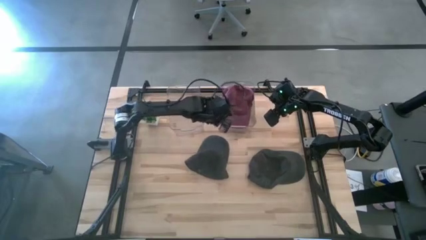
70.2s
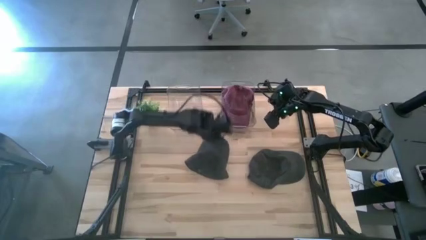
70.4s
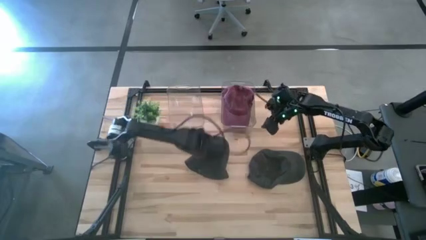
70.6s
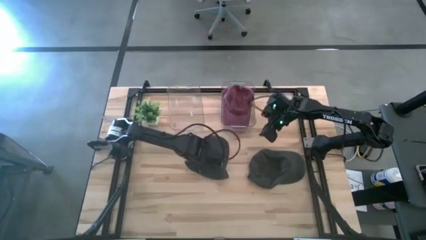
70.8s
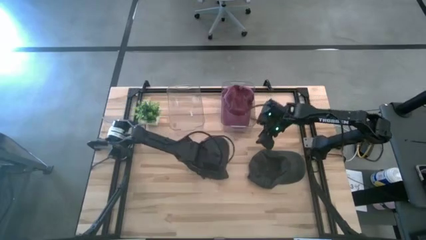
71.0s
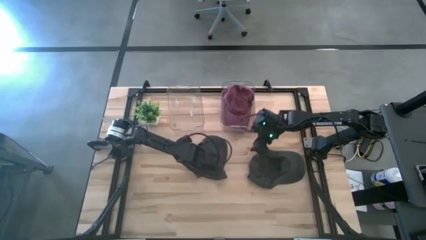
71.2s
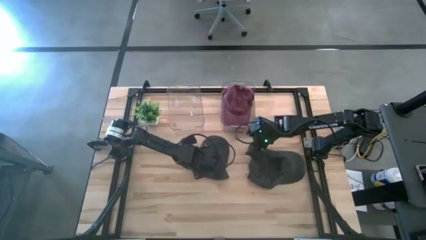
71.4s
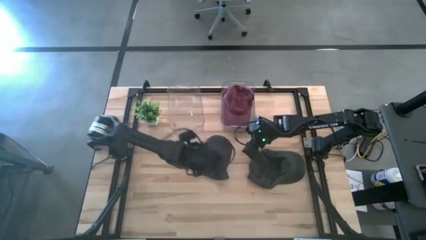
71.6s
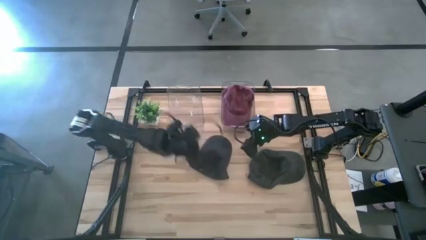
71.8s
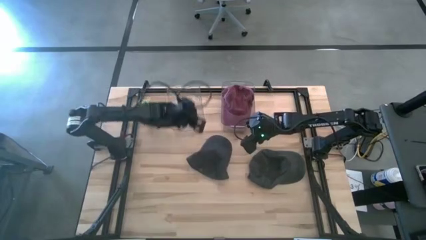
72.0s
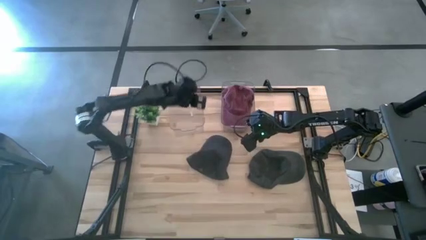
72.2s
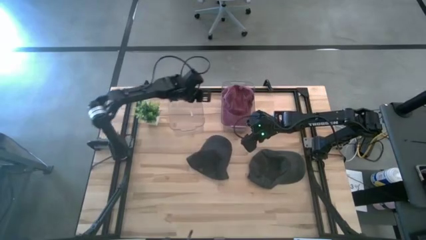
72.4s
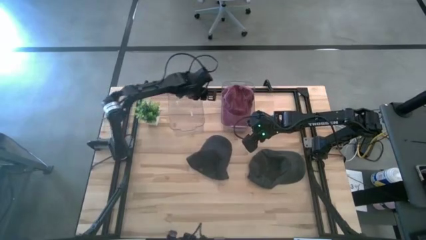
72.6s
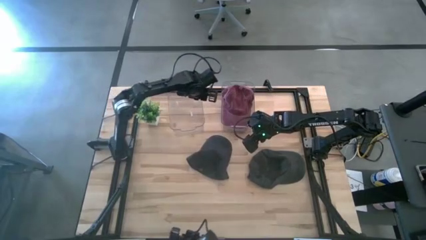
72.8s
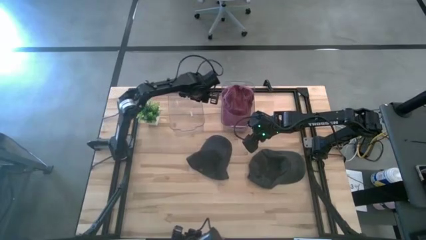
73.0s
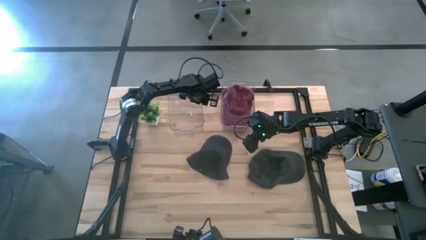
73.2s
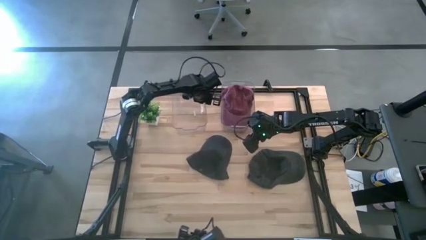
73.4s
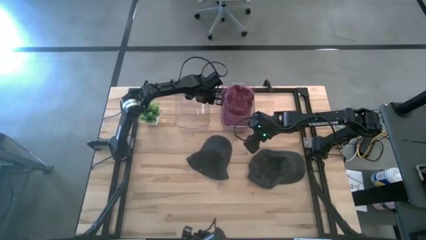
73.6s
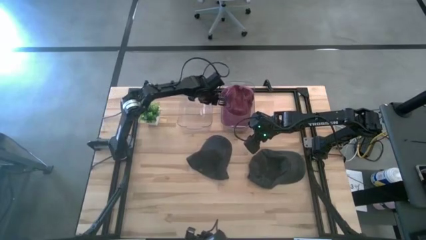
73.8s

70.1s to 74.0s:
Task: Pick & Place hat
Adjust the left transparent bin on the table

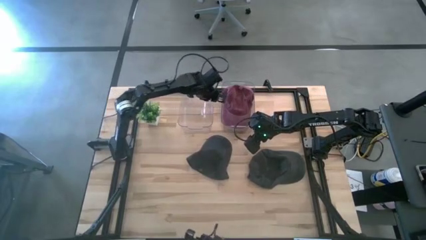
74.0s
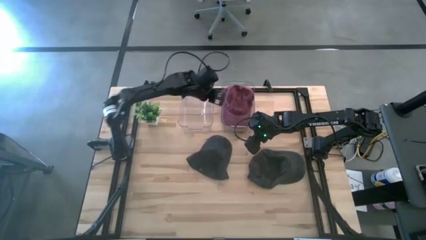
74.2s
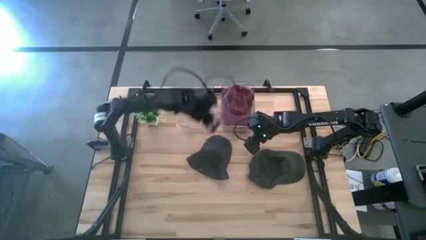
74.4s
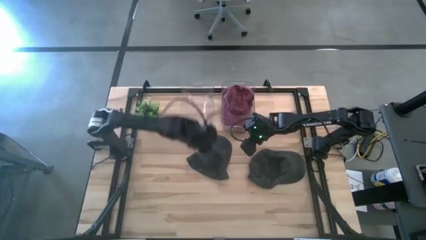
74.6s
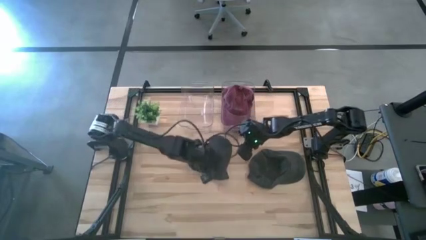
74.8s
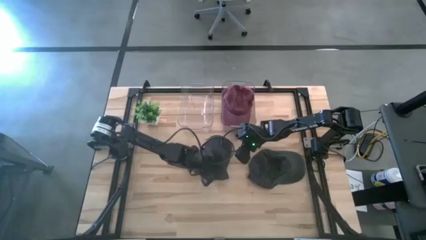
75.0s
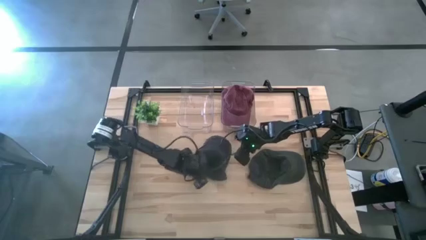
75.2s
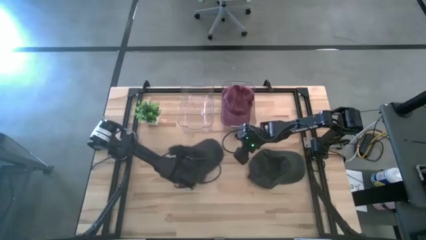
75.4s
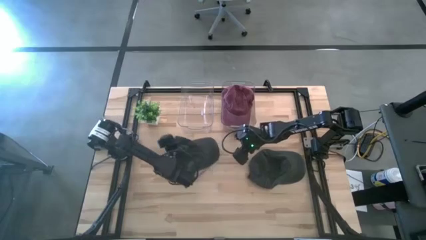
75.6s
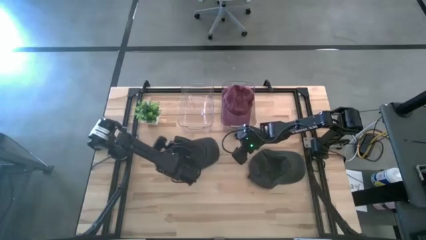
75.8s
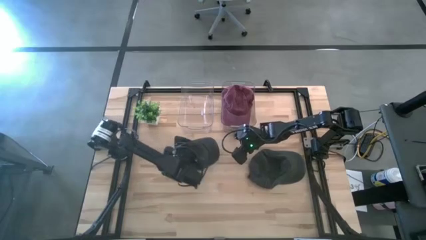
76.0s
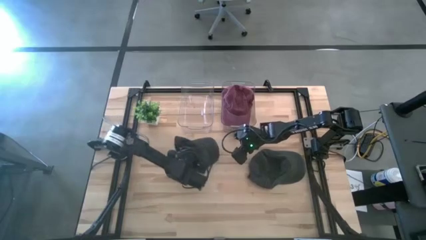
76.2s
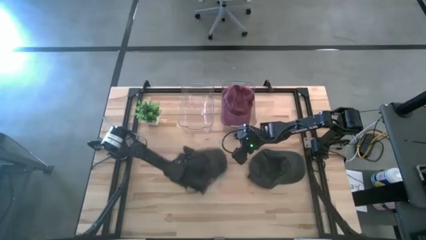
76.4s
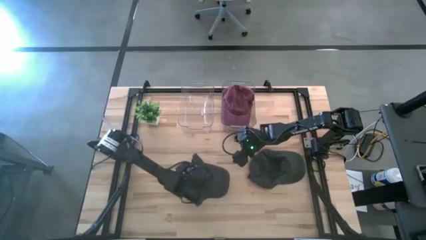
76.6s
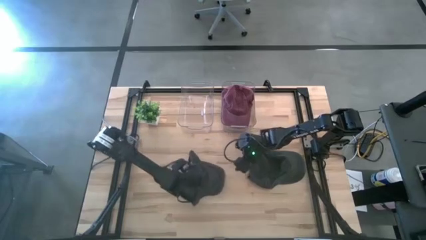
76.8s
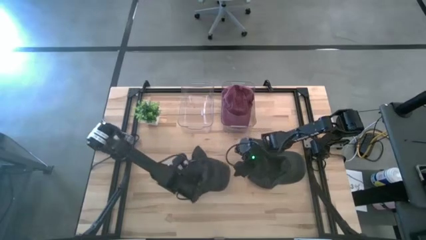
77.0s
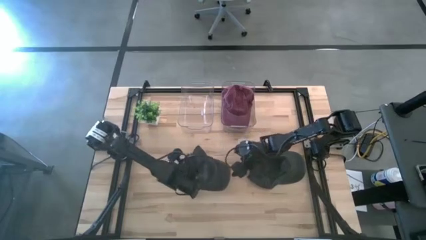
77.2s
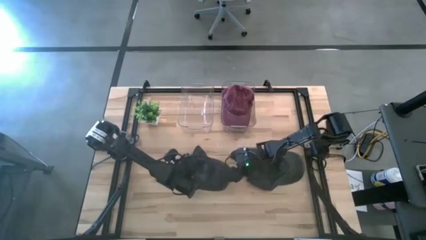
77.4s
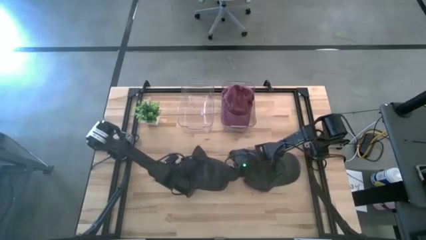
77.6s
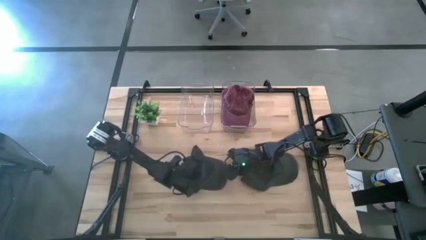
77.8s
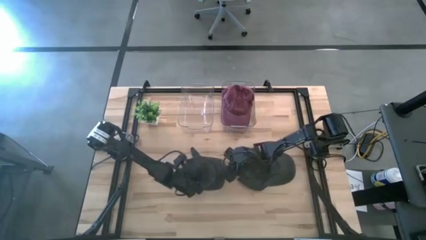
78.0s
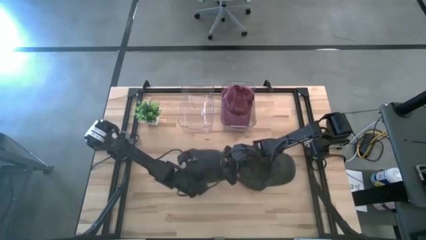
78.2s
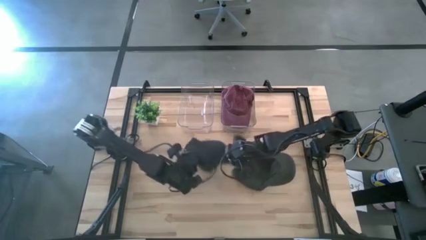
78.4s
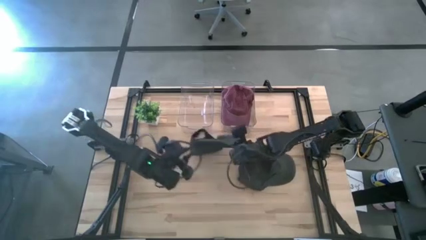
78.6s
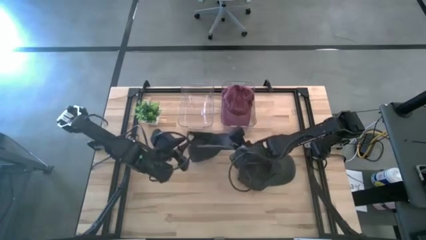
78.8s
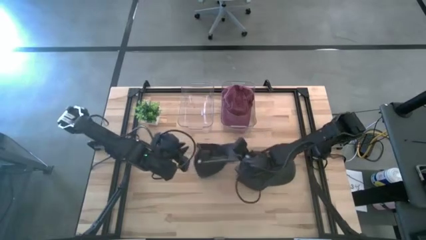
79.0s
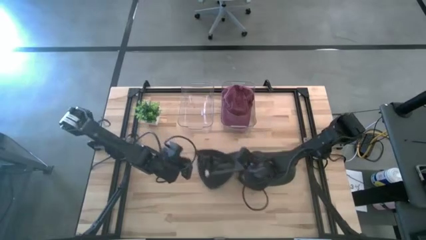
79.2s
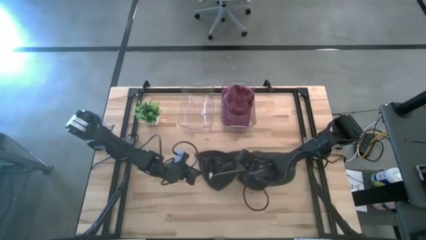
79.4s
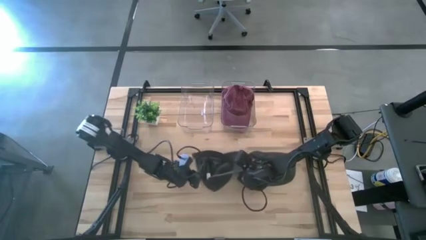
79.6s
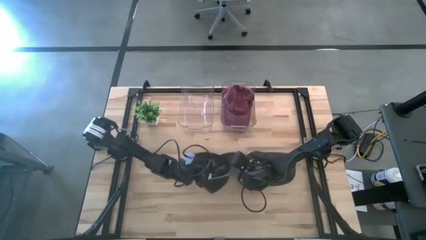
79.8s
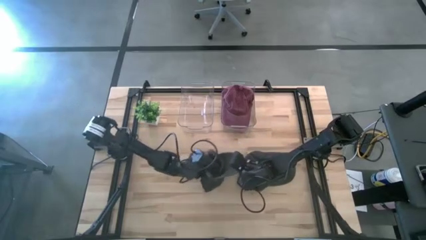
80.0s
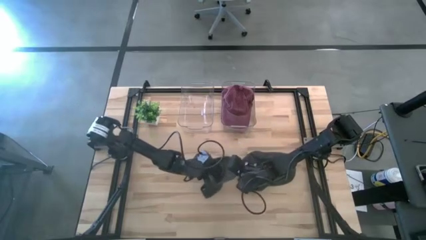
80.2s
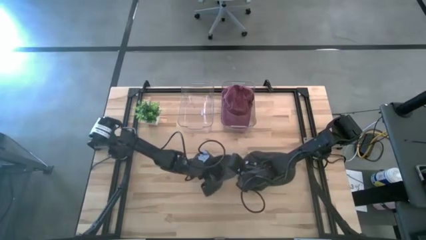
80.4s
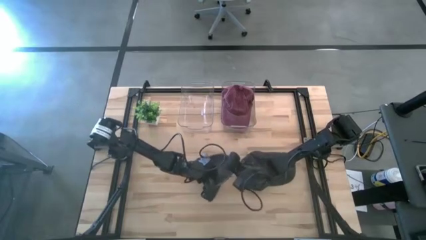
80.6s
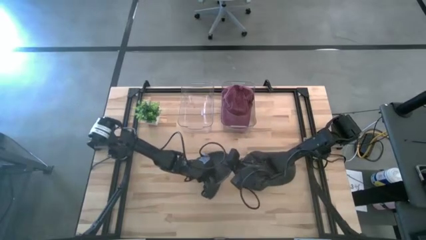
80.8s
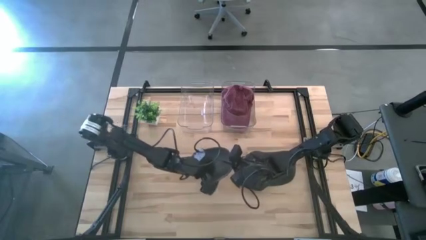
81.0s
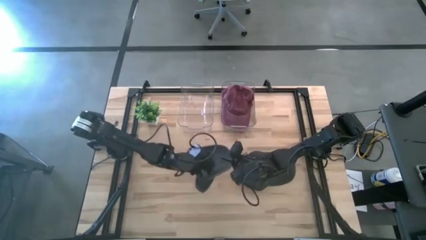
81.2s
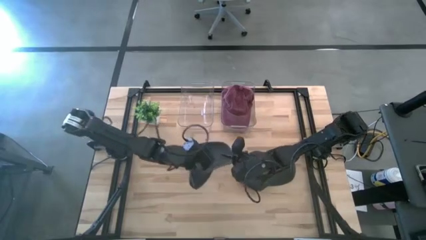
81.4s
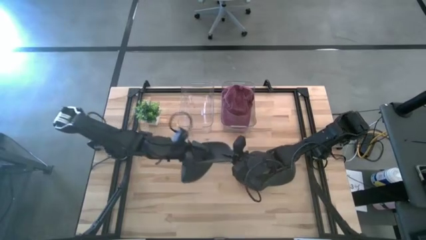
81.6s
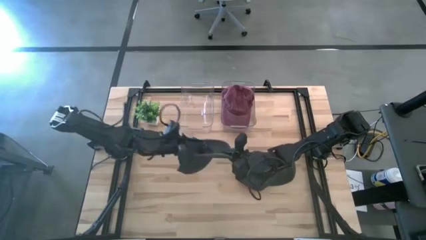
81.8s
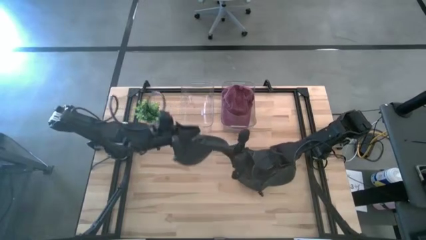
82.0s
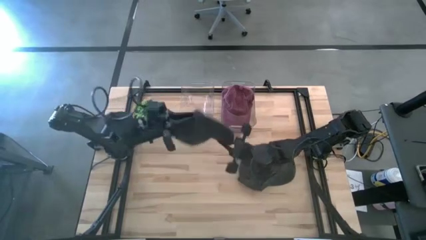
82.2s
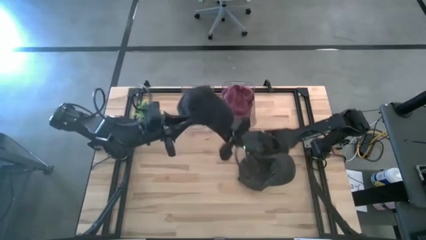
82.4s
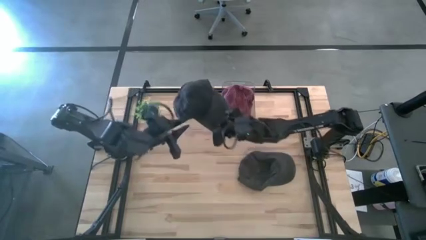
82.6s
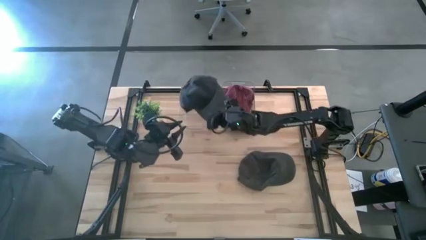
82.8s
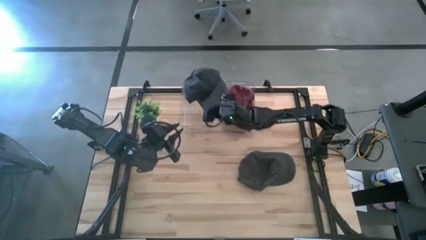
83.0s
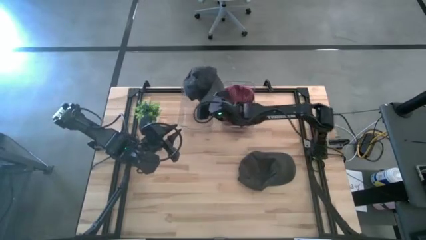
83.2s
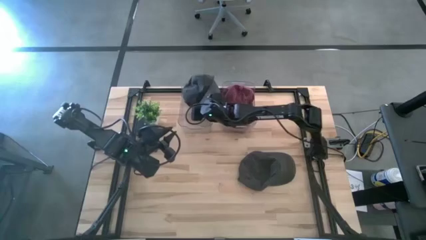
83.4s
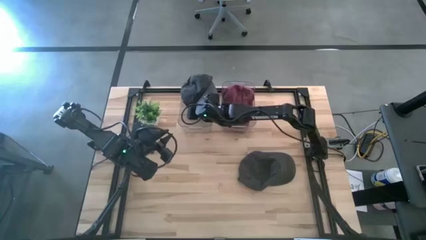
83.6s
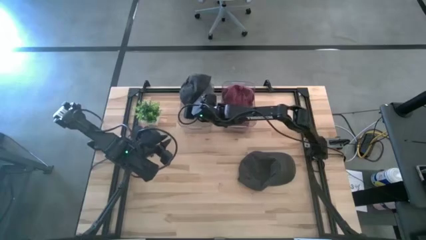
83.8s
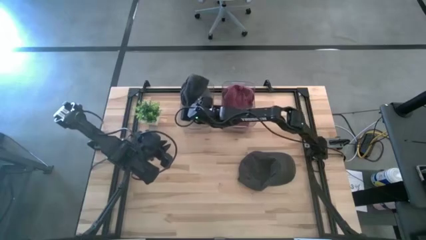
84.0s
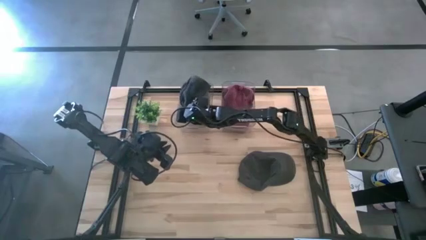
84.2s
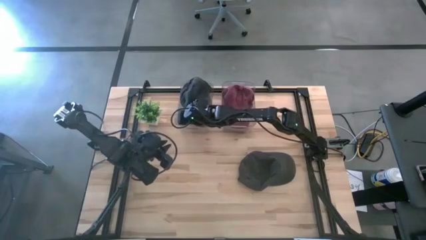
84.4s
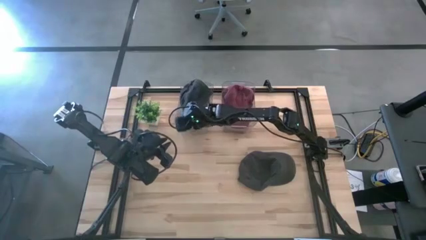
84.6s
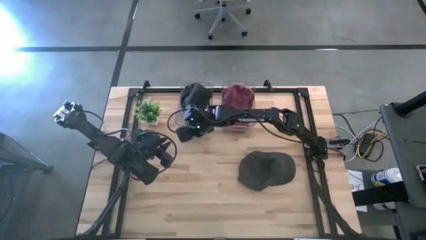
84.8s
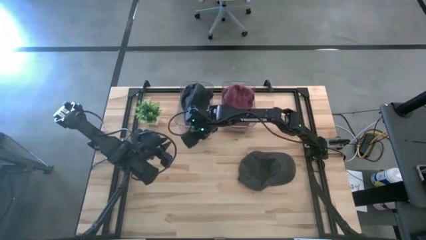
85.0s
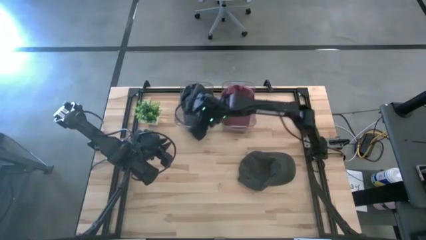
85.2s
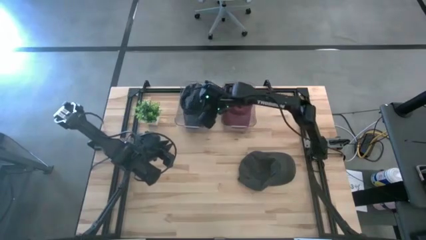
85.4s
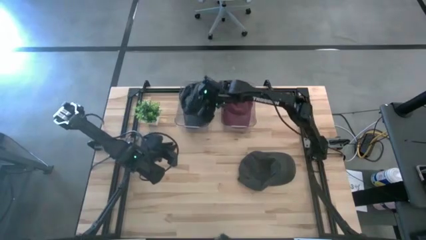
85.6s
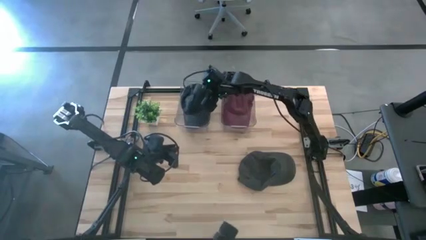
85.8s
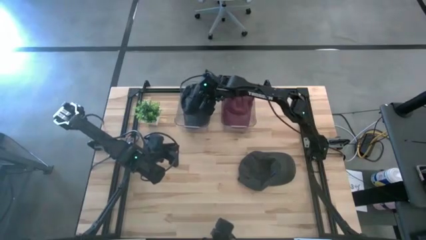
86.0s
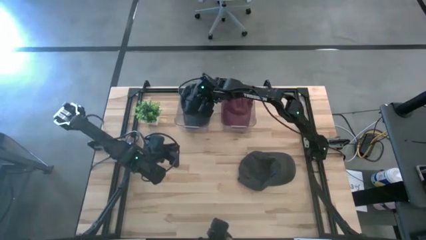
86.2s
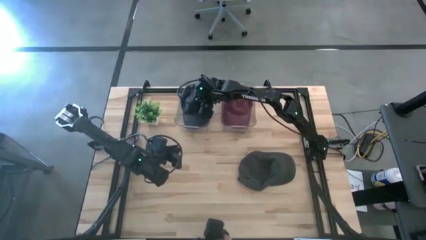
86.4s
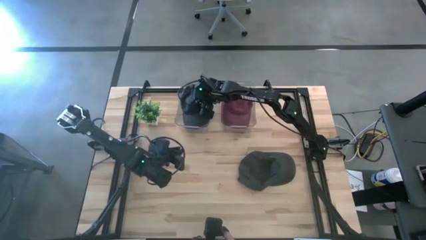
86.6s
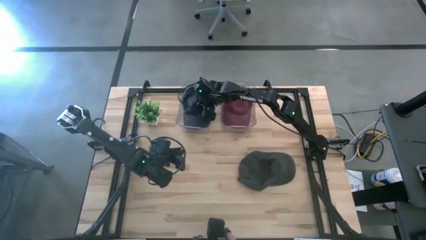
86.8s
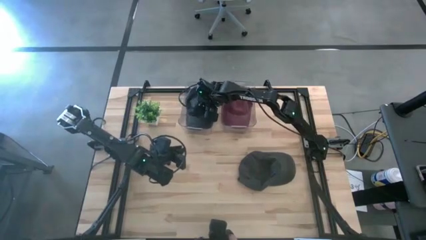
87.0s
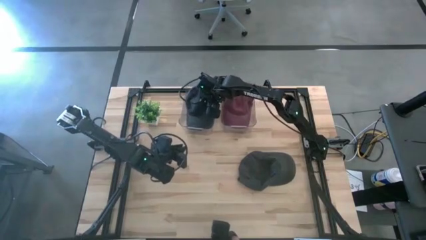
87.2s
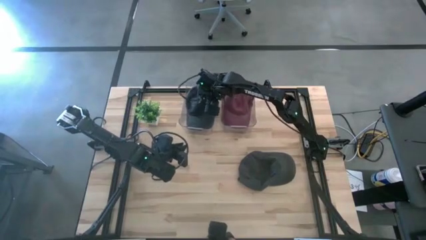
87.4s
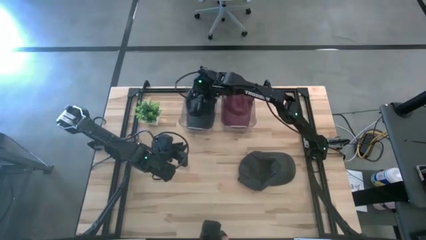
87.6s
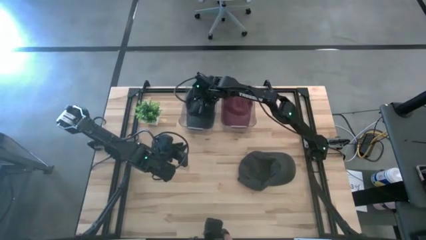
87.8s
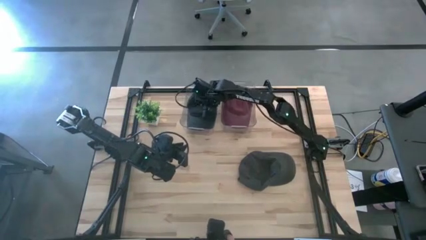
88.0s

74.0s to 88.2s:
Put the left black cap into the left transparent bin
